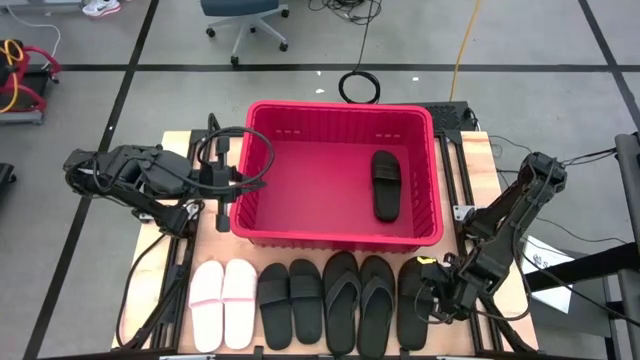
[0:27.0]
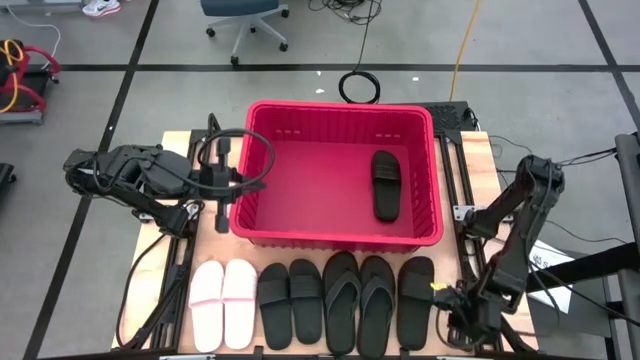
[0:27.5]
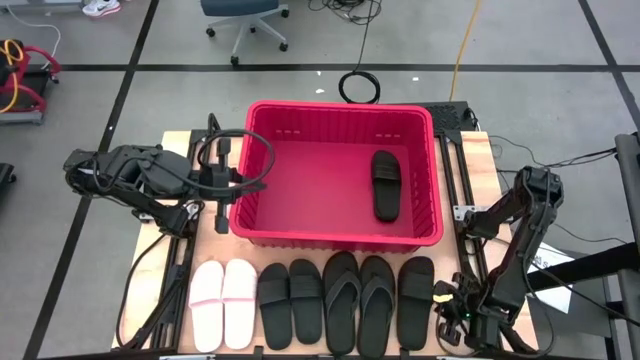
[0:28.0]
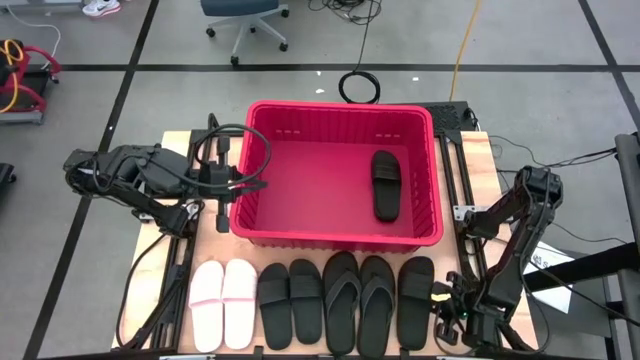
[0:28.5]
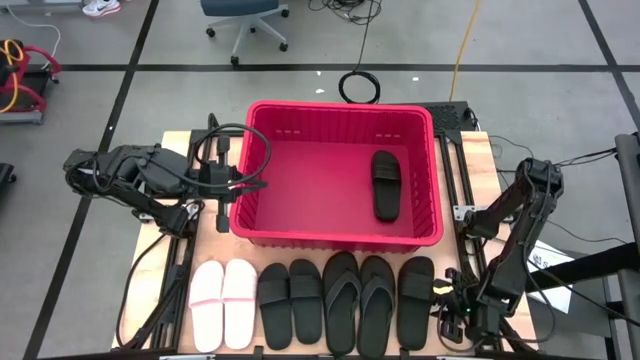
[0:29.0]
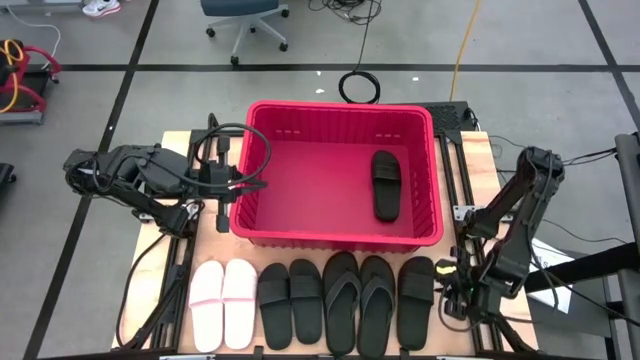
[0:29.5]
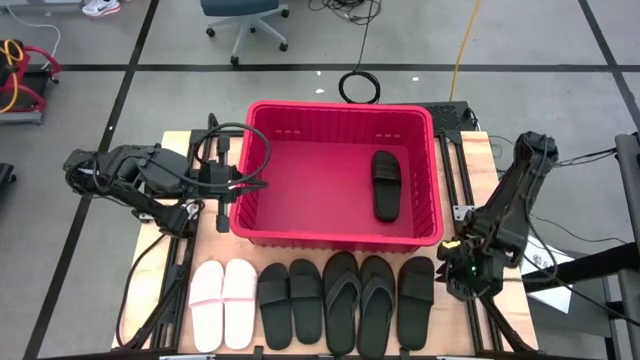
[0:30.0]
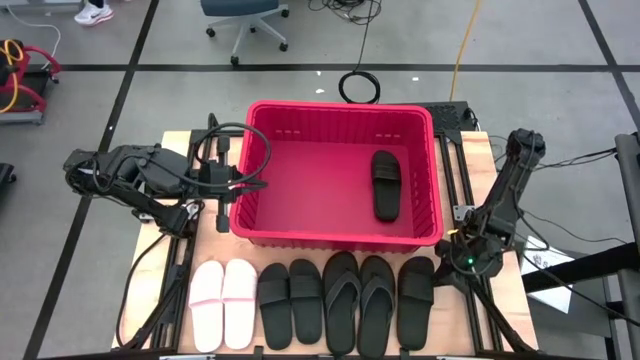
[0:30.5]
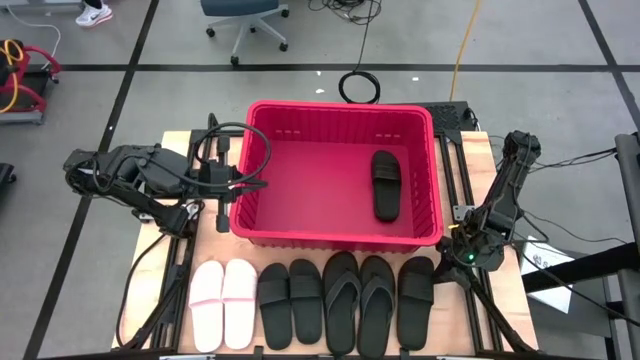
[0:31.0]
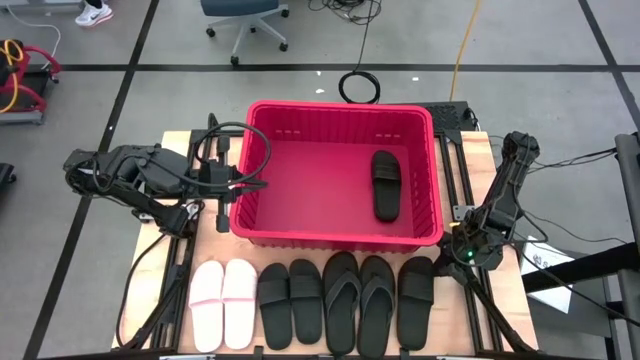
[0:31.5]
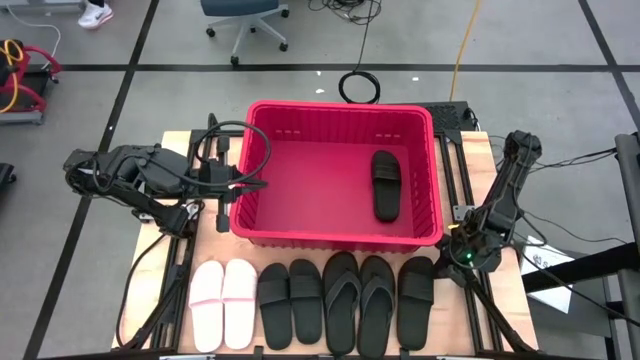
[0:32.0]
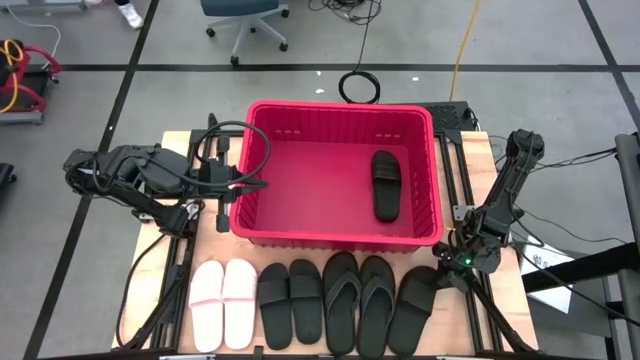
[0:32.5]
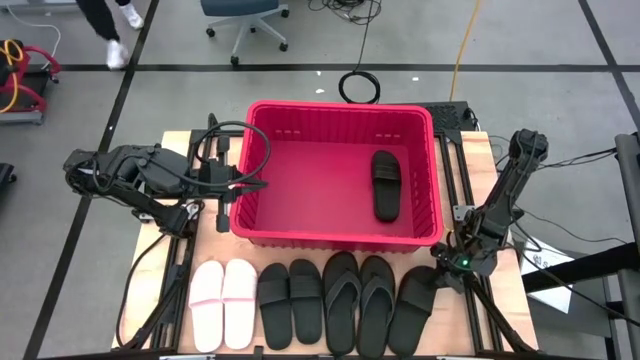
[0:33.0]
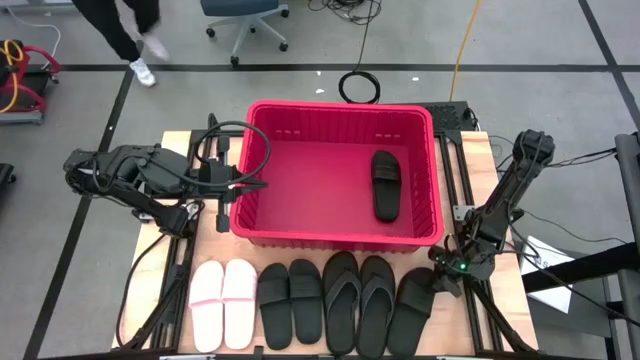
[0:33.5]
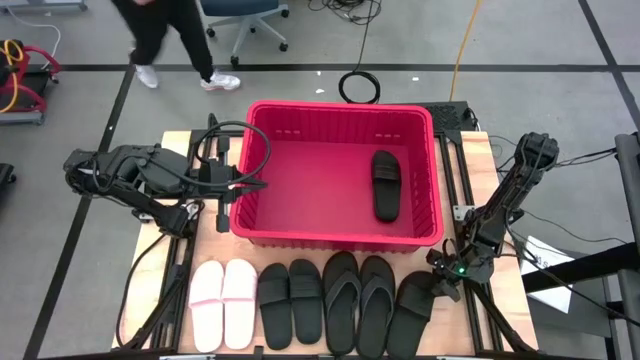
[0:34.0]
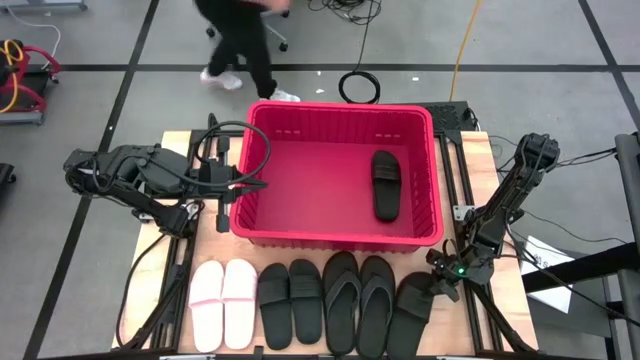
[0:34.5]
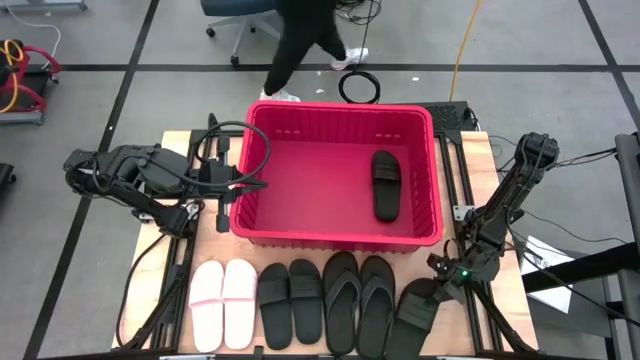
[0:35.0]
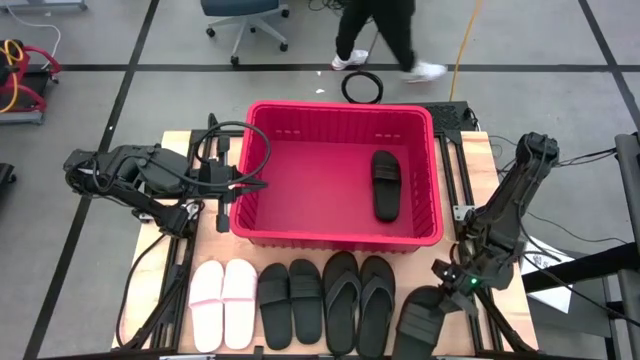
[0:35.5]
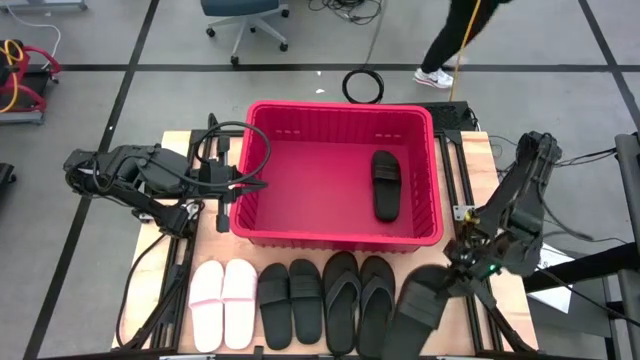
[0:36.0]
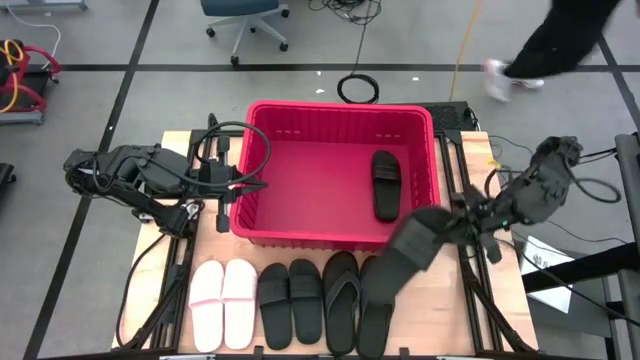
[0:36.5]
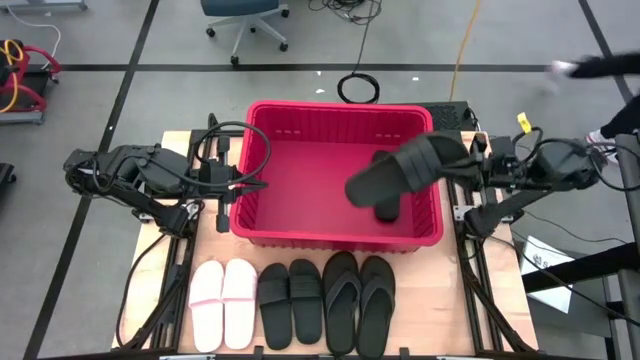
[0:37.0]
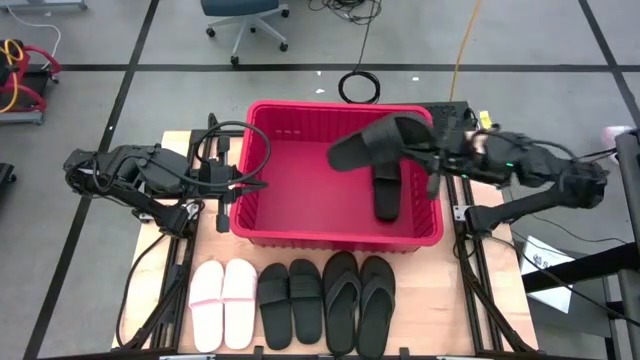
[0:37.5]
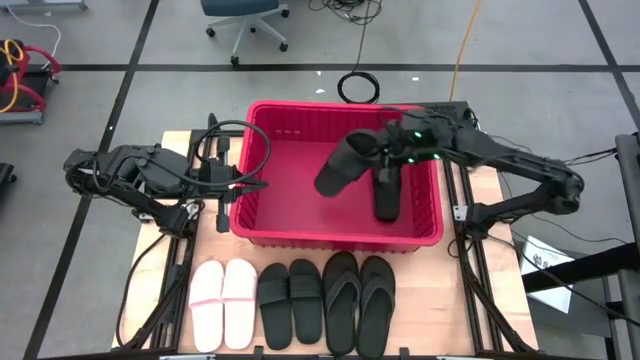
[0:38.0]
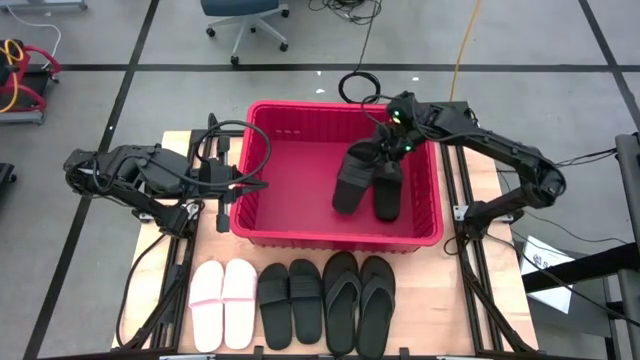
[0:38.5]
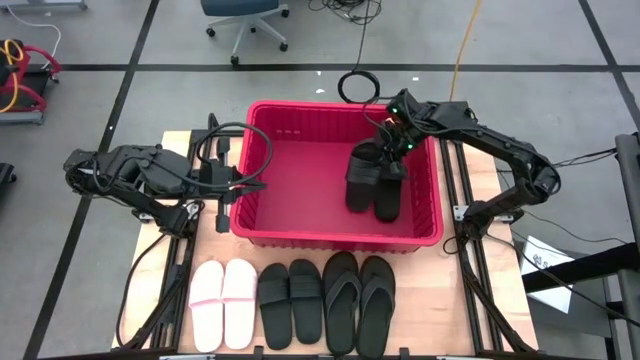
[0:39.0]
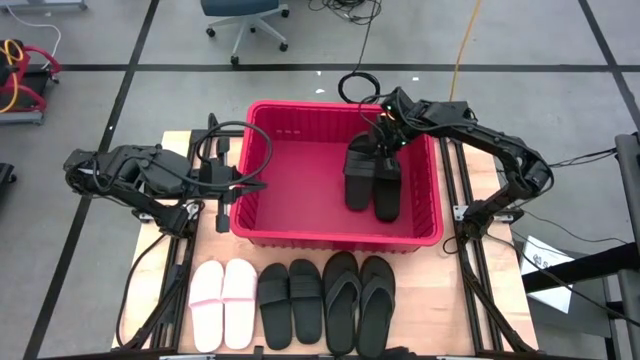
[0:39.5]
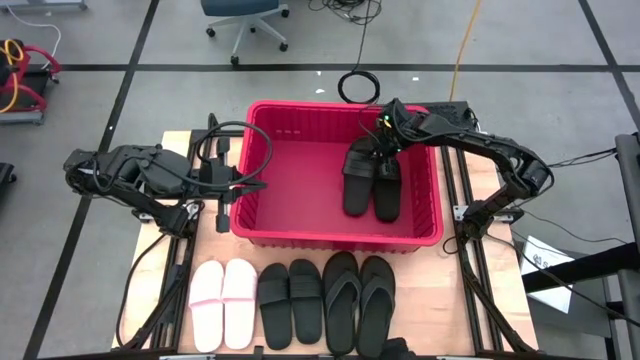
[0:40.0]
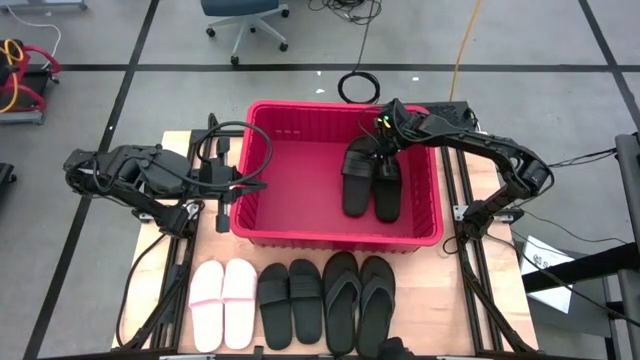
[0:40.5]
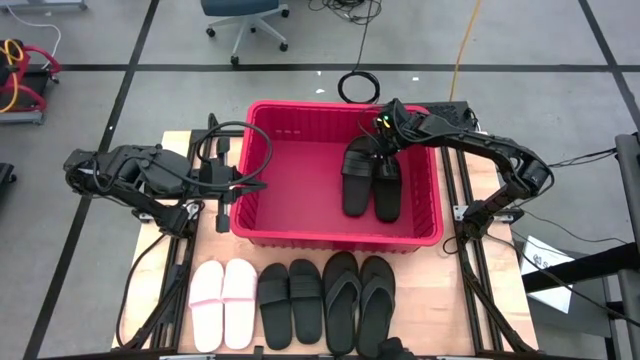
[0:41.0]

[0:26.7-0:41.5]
Task: Pick and place slides into bin
Put the black slide into the red bin
